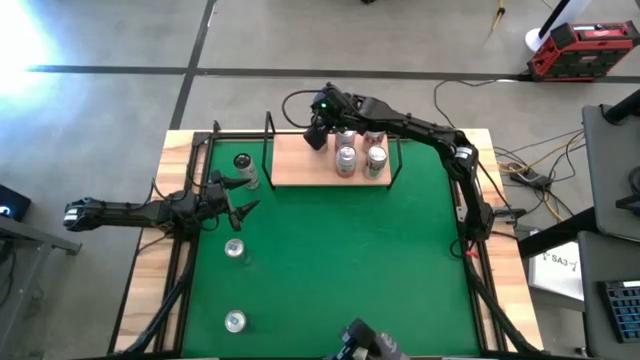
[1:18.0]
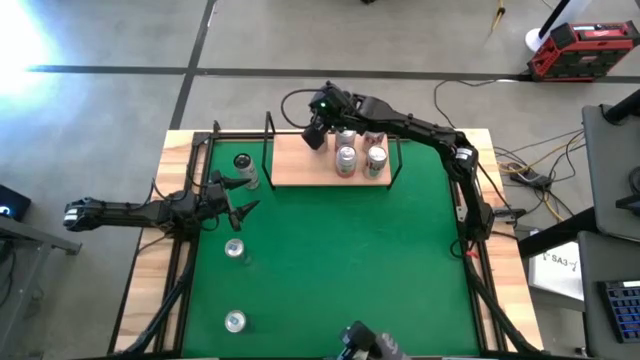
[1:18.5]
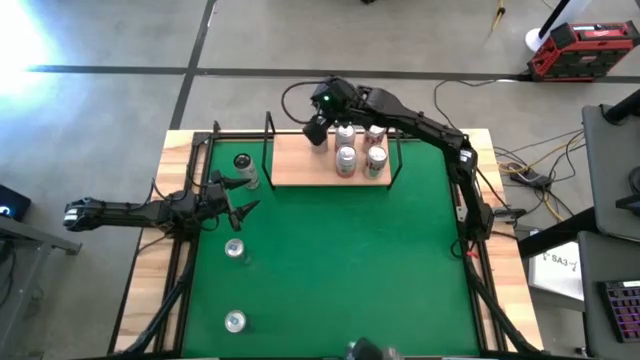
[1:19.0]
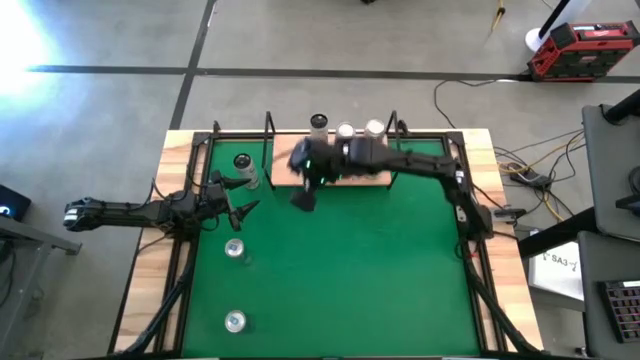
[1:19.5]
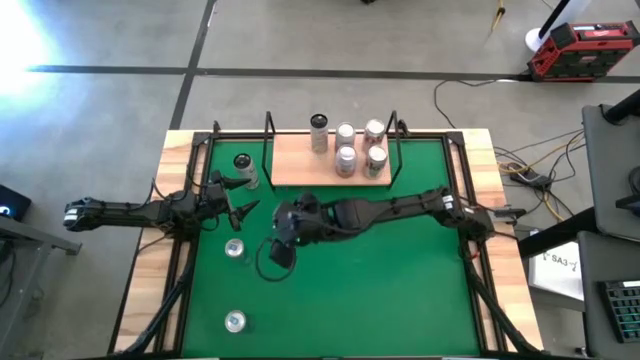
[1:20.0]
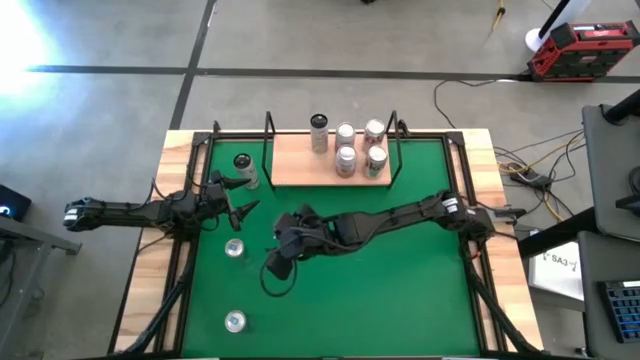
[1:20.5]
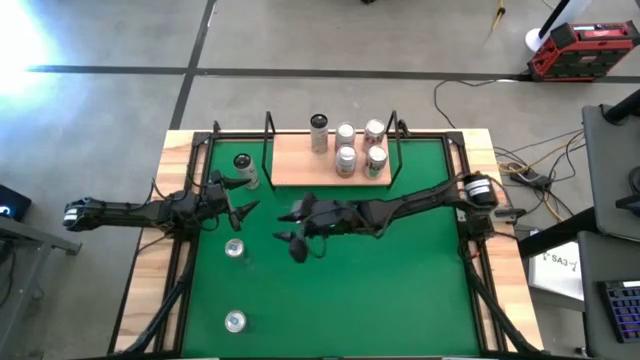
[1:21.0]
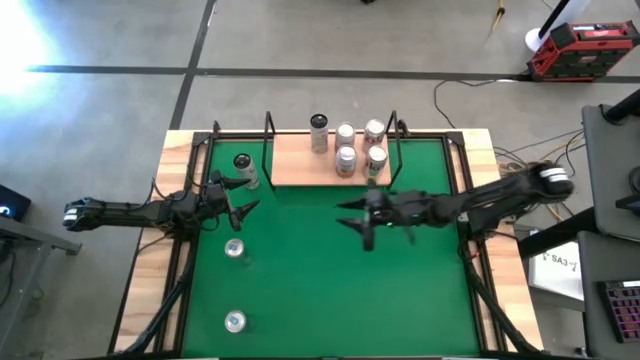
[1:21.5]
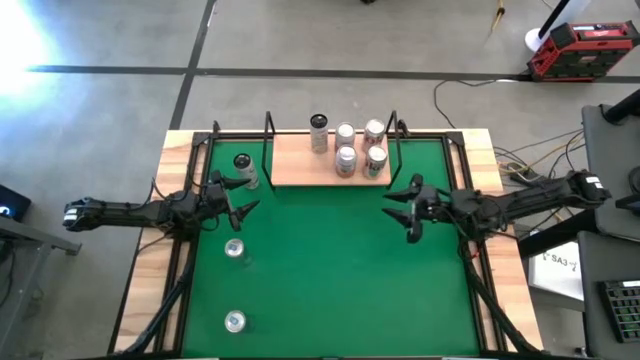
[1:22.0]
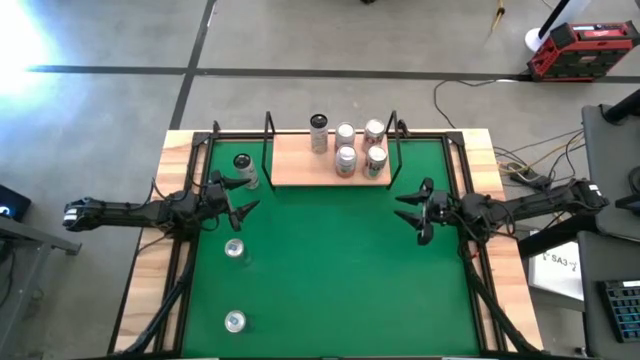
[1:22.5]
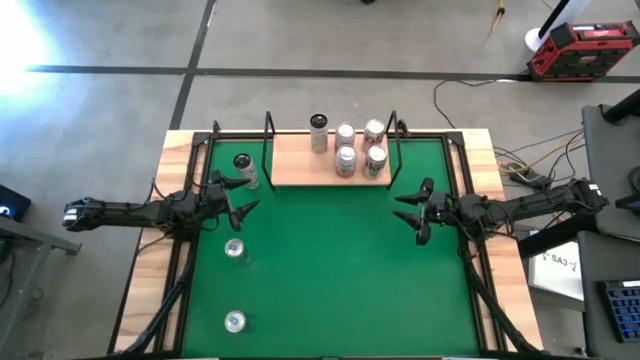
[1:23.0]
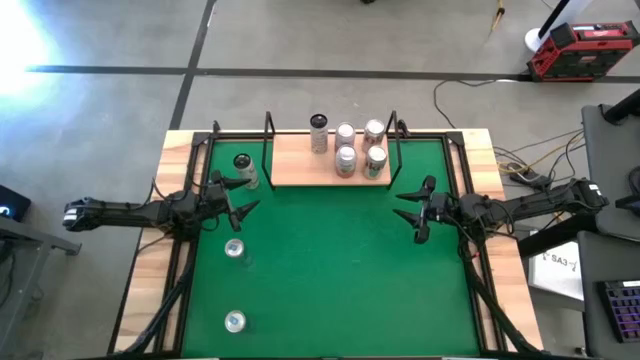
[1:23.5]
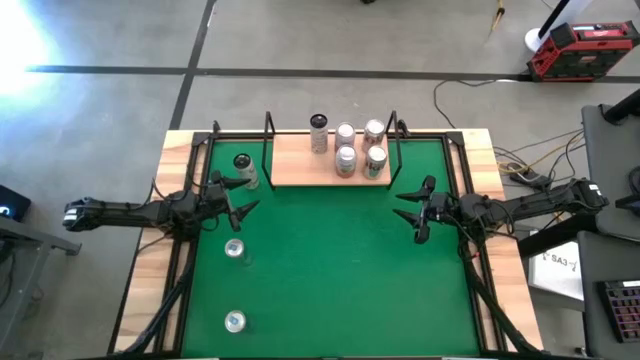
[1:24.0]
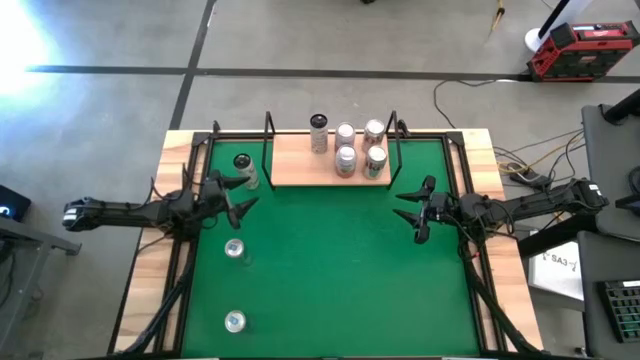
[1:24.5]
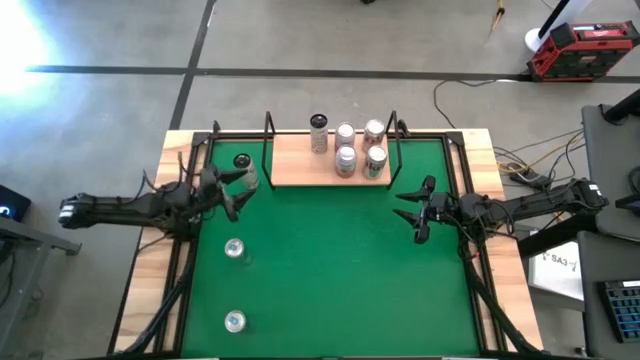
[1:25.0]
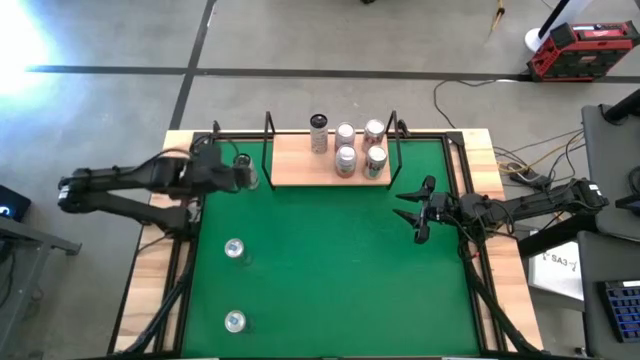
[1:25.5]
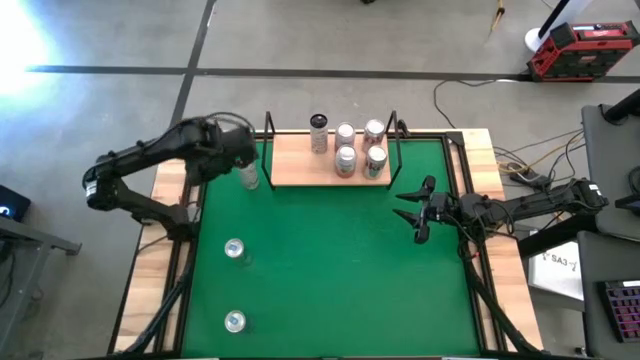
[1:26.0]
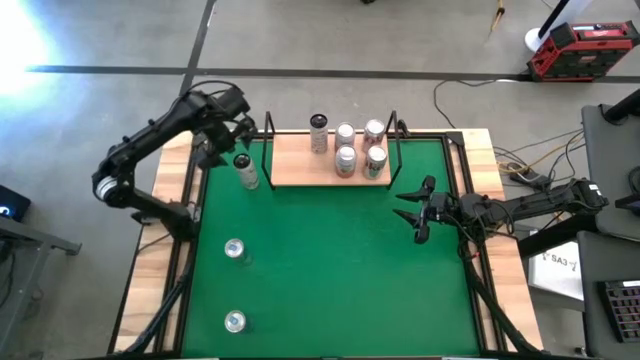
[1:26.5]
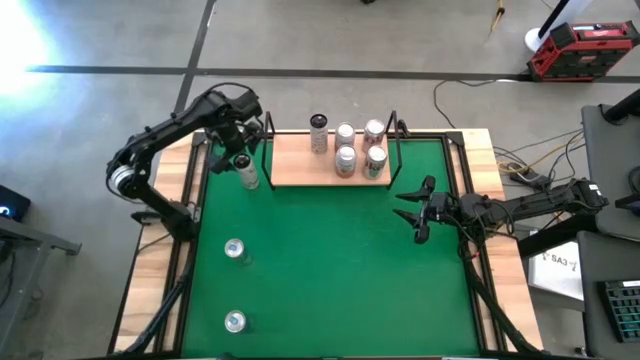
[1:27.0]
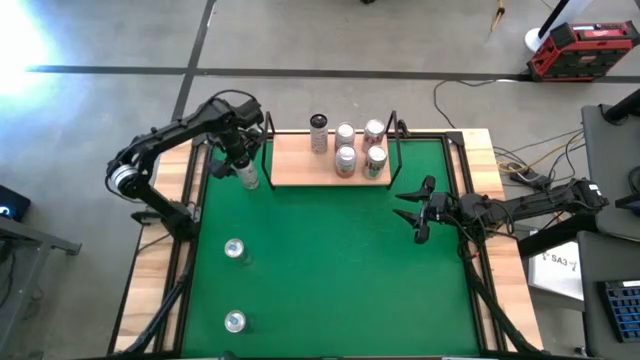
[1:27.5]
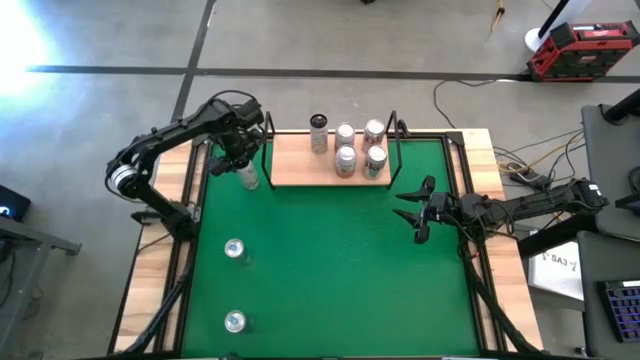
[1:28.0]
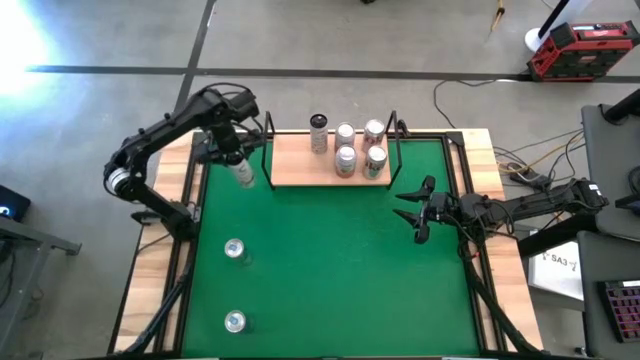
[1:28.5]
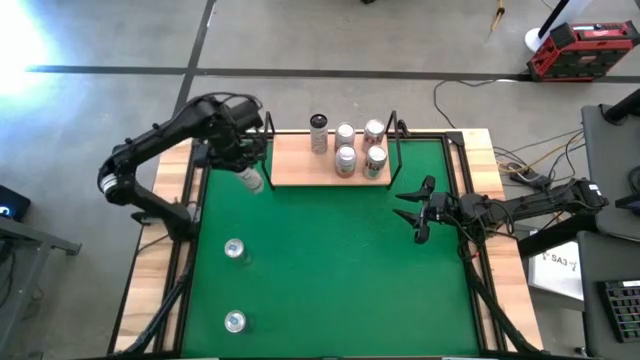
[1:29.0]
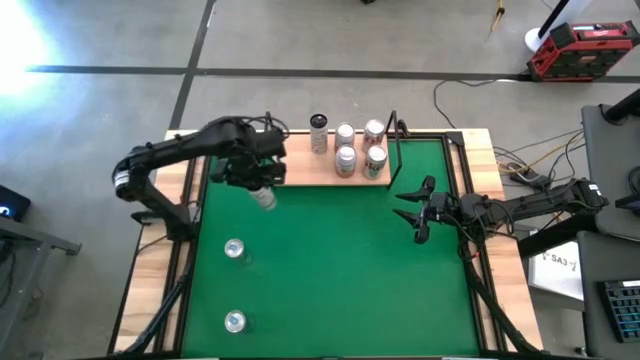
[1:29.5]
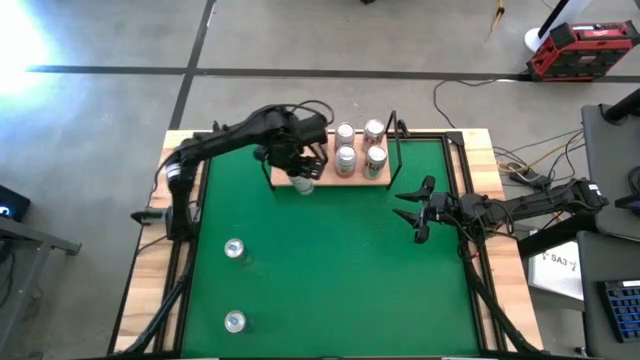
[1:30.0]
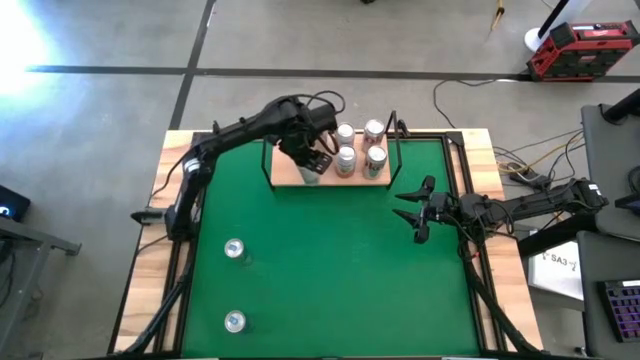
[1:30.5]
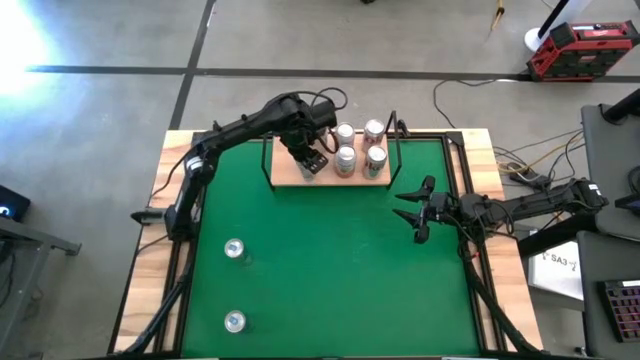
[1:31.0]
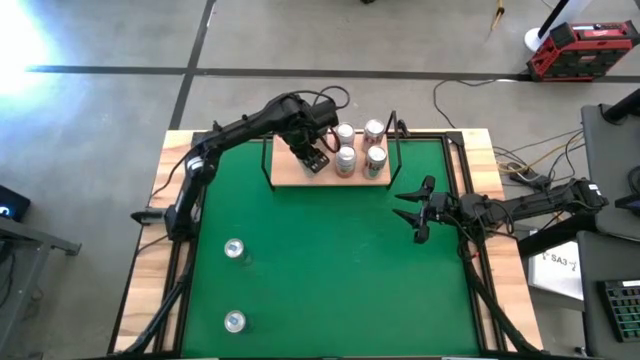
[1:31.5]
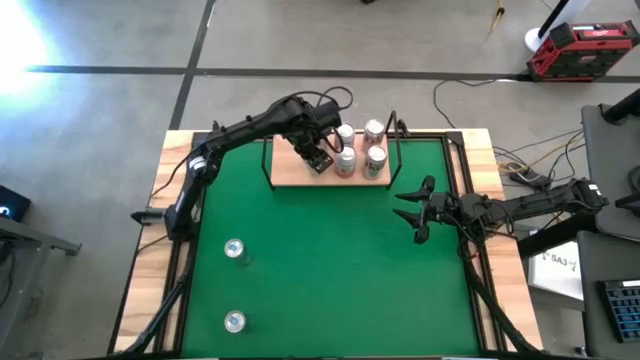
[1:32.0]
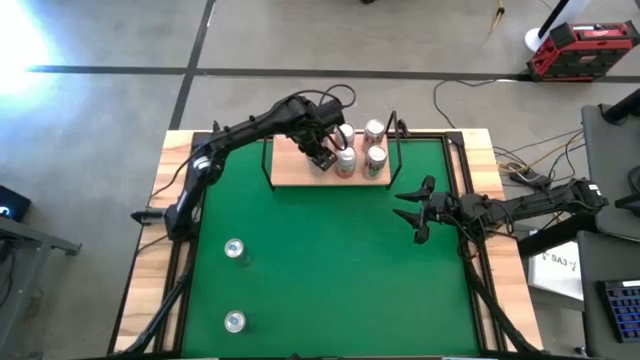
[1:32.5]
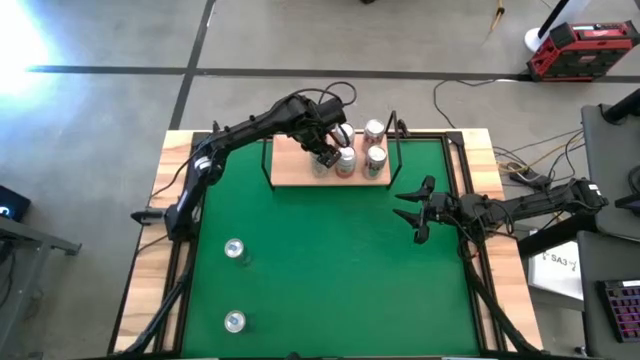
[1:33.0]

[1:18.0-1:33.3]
Task: Place canned beverage on shelf
Put the black and white soda can on the shelf aligned with the other black and white soda can

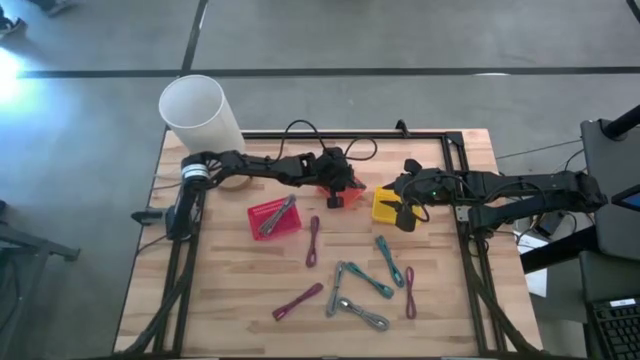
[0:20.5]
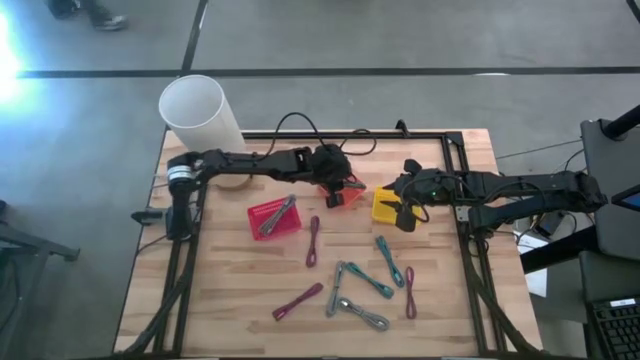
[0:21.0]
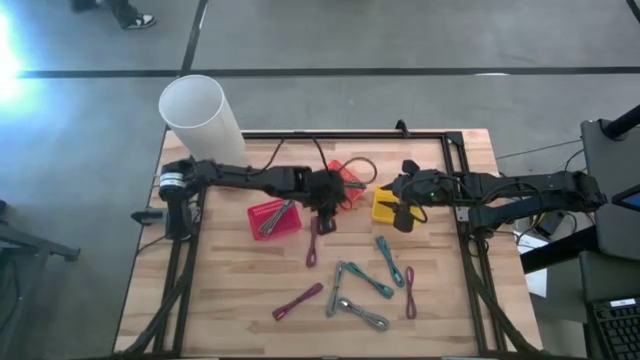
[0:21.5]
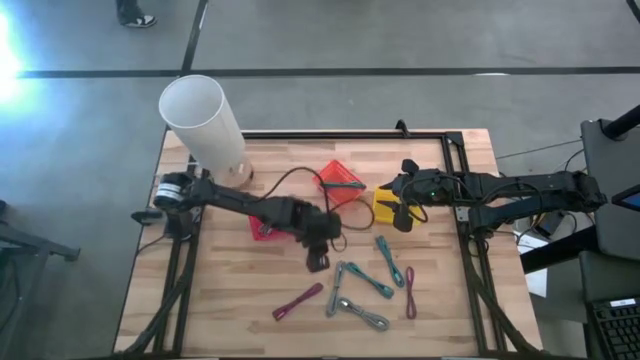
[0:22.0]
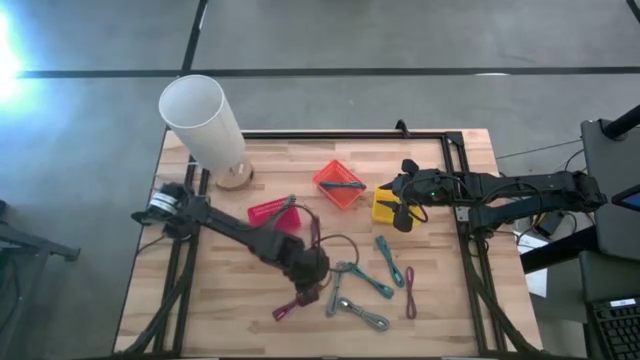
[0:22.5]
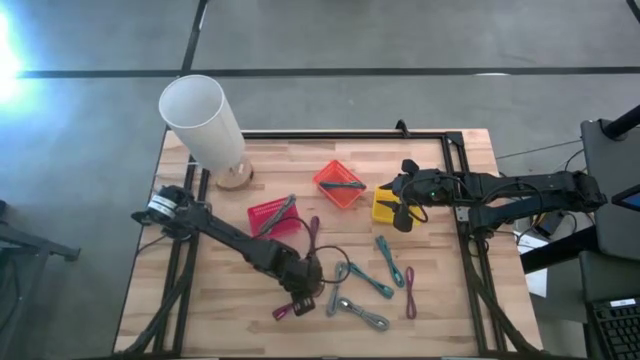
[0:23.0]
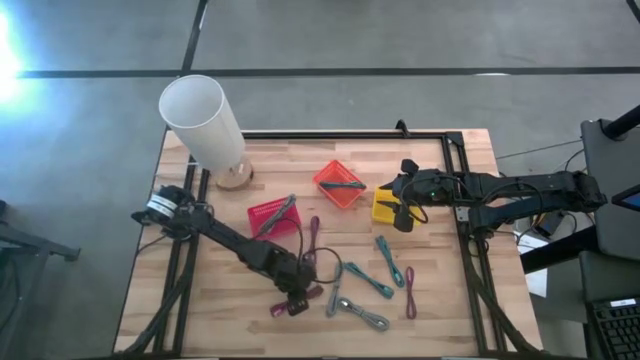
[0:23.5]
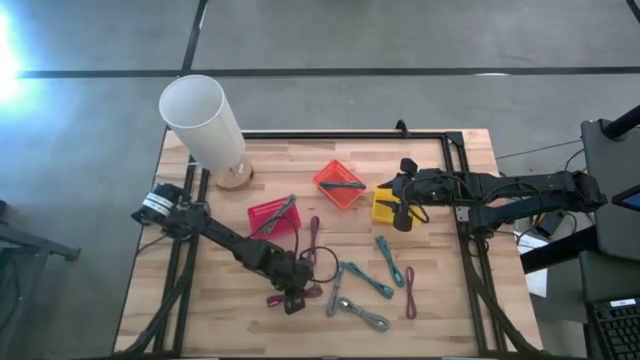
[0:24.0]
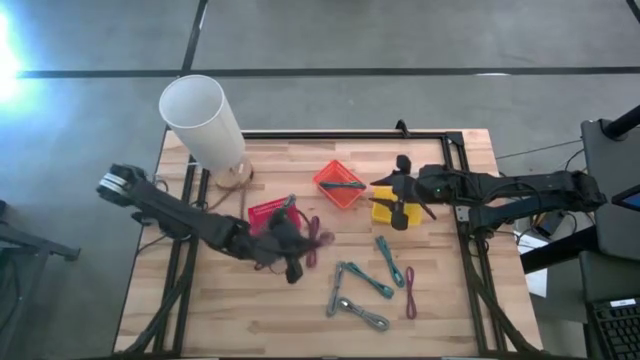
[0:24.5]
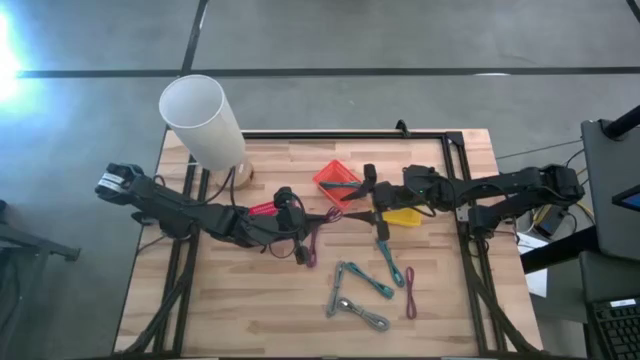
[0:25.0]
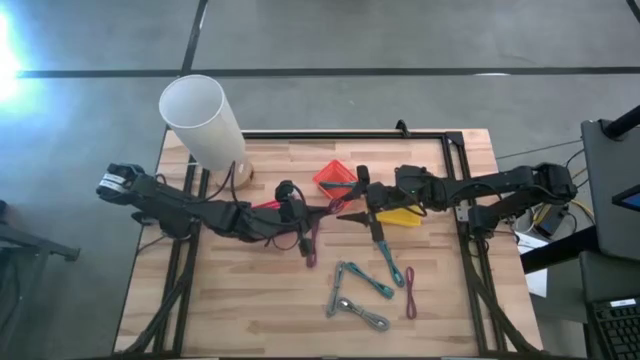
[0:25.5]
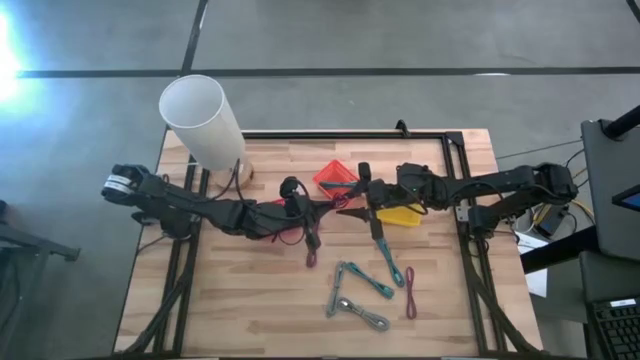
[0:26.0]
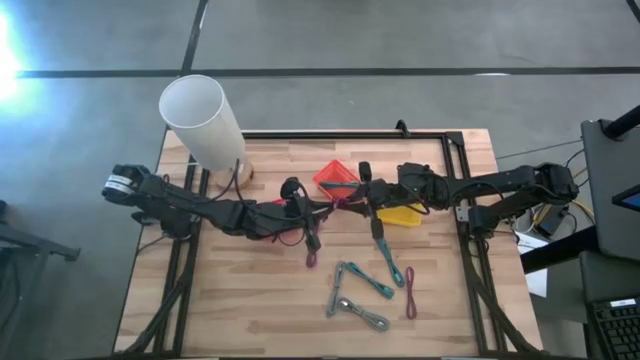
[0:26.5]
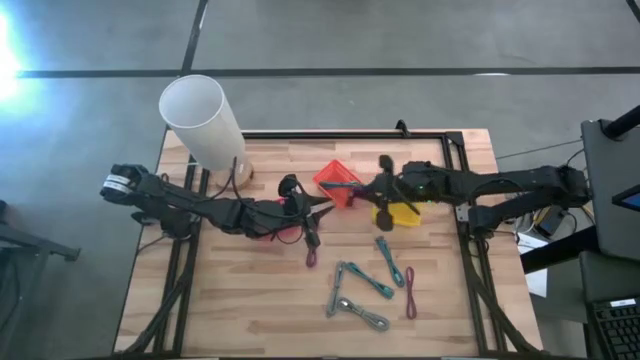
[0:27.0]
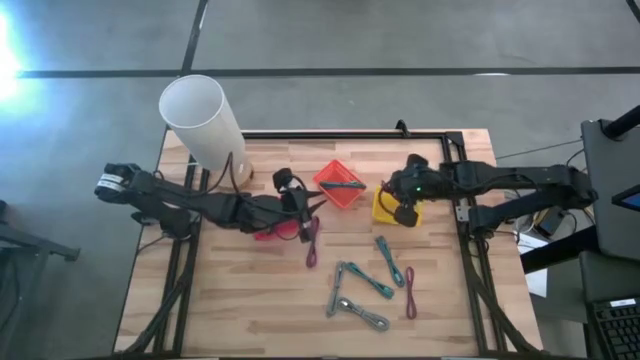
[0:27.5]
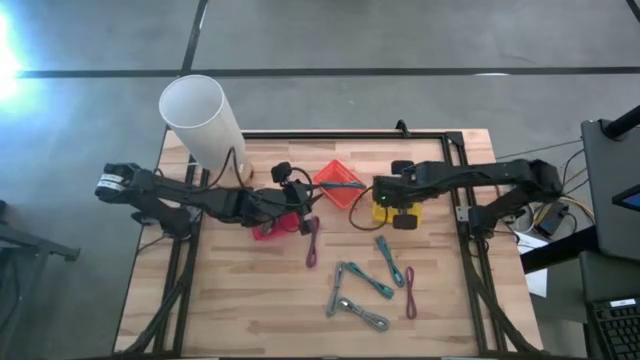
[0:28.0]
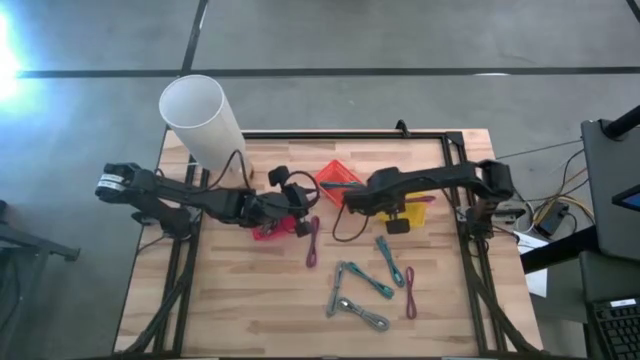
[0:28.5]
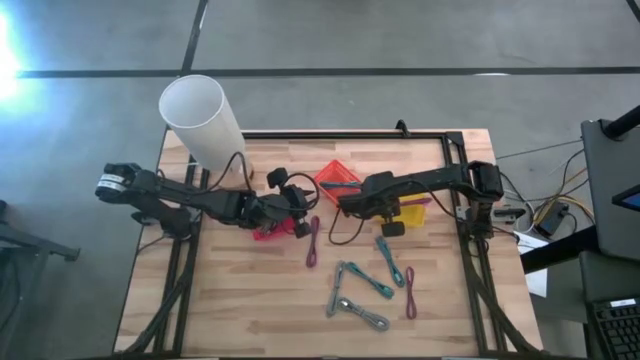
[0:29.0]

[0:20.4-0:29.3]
Task: Pick & Place USB Port
Put the bottom left black and pink charger cable into the yellow bin
